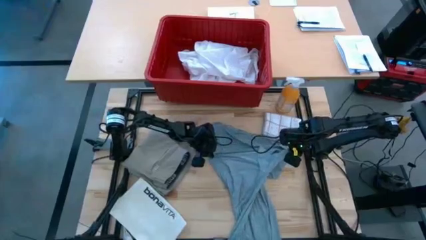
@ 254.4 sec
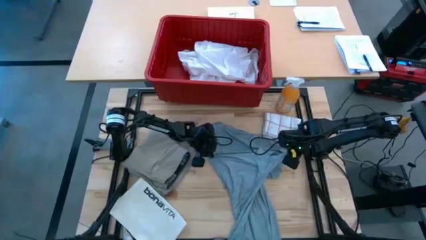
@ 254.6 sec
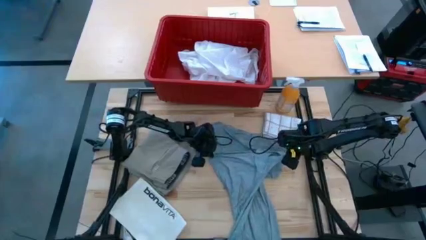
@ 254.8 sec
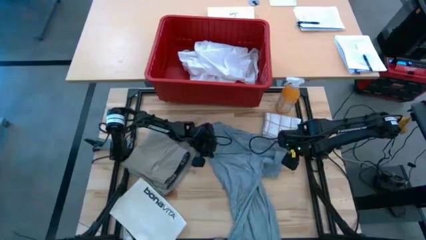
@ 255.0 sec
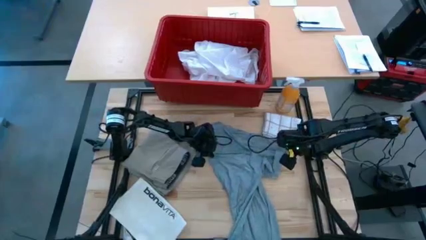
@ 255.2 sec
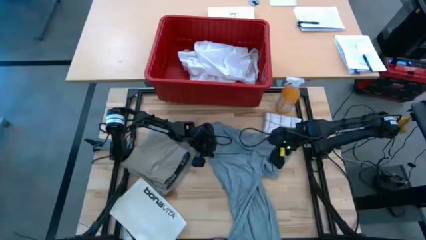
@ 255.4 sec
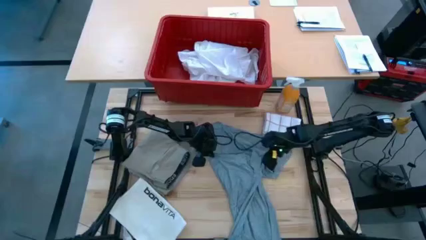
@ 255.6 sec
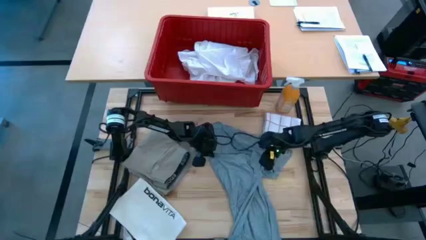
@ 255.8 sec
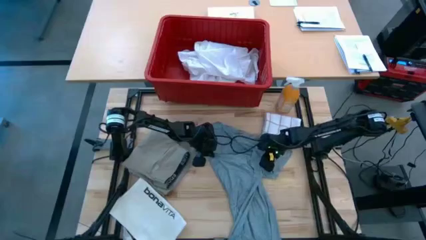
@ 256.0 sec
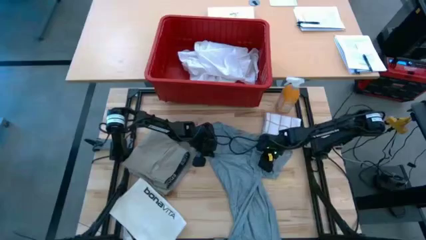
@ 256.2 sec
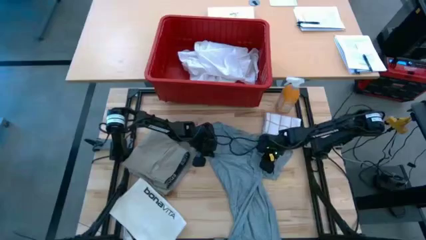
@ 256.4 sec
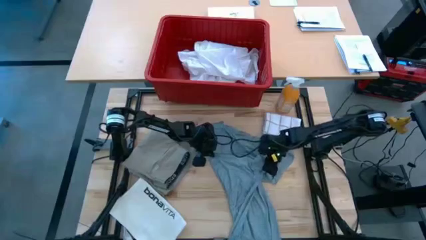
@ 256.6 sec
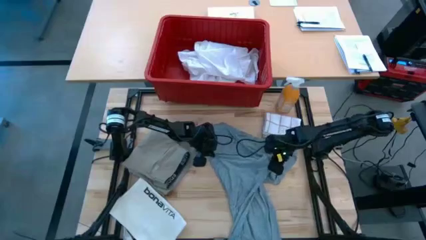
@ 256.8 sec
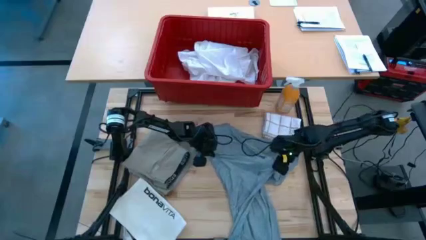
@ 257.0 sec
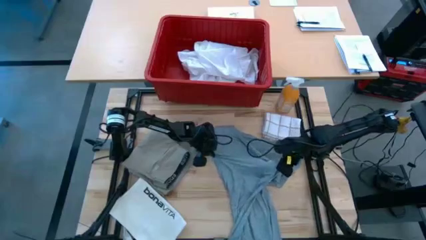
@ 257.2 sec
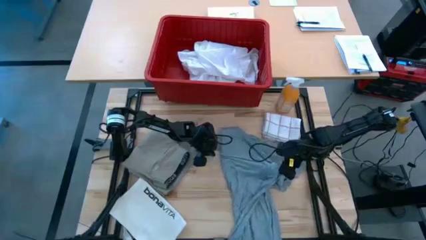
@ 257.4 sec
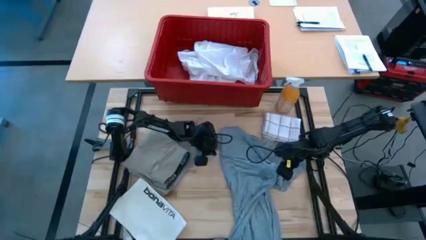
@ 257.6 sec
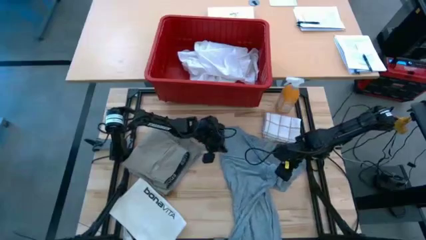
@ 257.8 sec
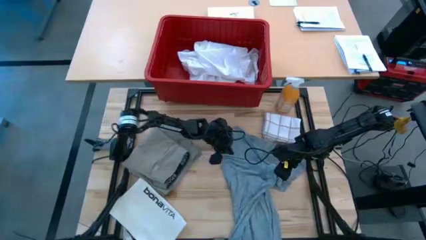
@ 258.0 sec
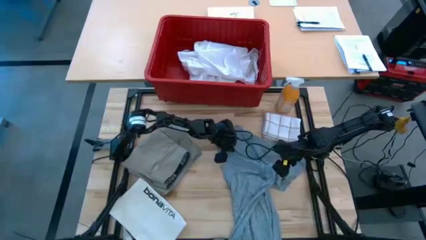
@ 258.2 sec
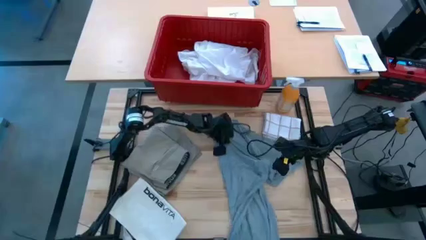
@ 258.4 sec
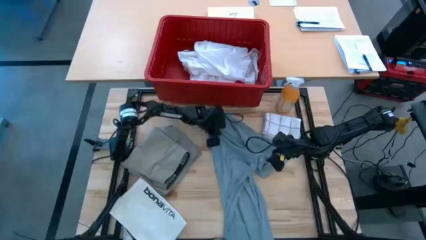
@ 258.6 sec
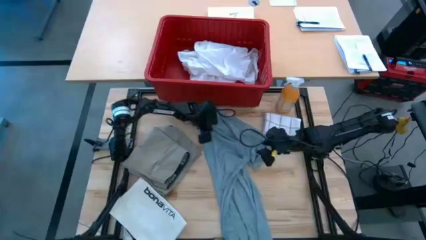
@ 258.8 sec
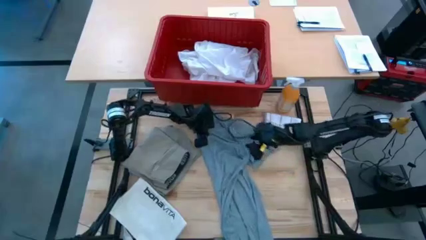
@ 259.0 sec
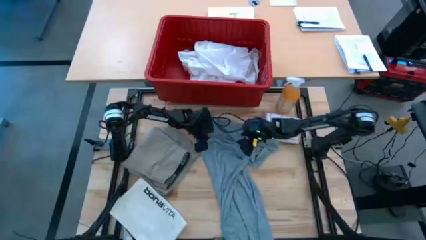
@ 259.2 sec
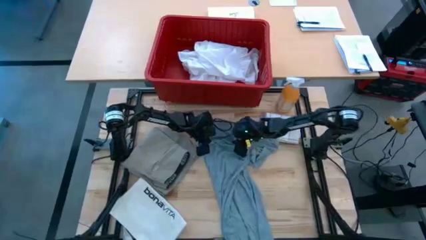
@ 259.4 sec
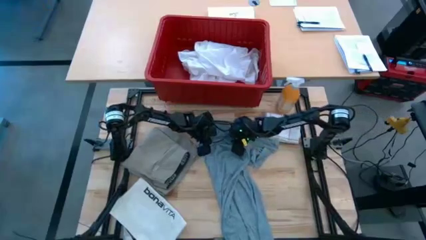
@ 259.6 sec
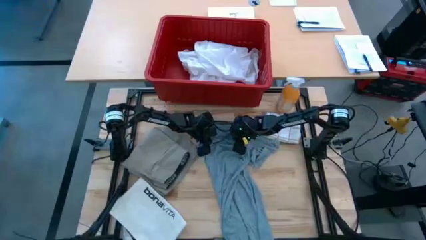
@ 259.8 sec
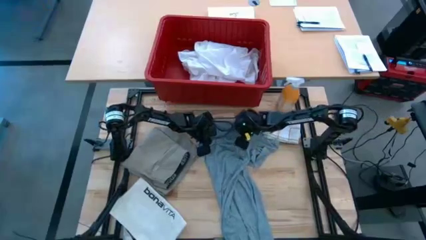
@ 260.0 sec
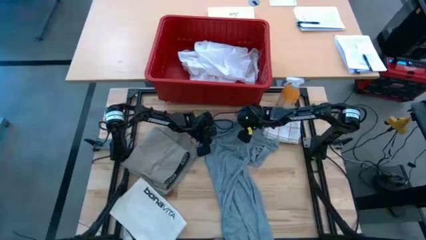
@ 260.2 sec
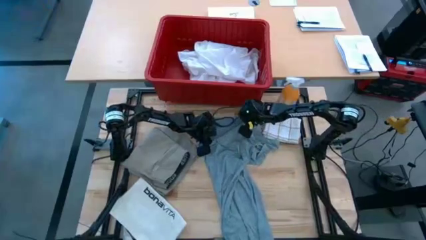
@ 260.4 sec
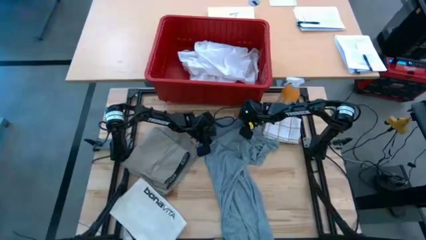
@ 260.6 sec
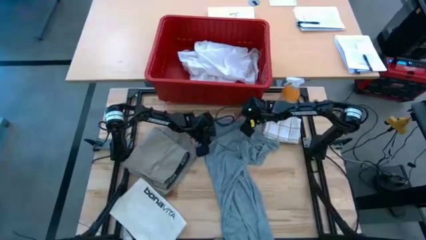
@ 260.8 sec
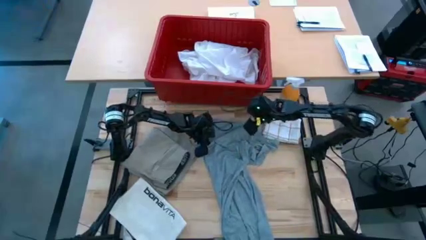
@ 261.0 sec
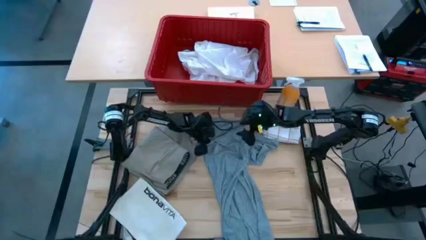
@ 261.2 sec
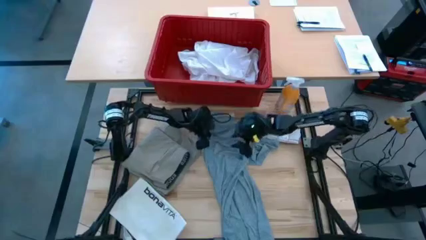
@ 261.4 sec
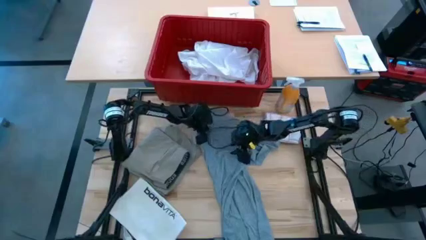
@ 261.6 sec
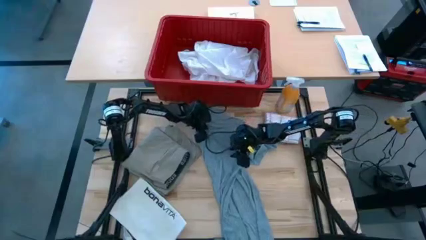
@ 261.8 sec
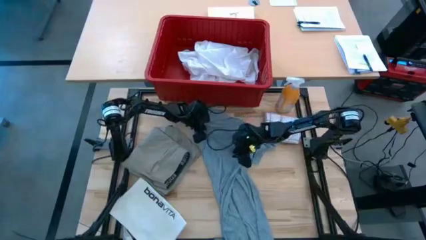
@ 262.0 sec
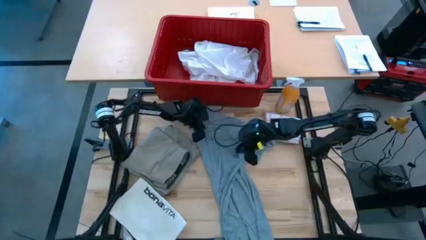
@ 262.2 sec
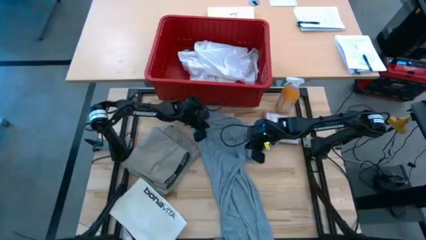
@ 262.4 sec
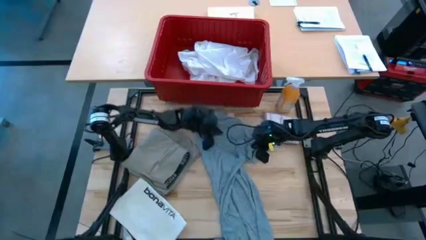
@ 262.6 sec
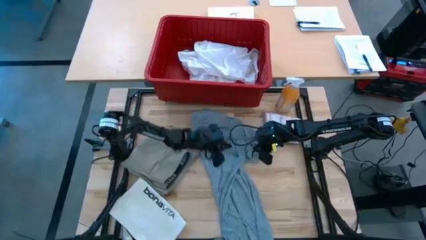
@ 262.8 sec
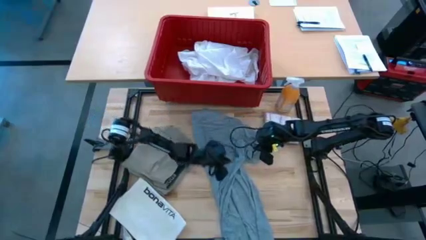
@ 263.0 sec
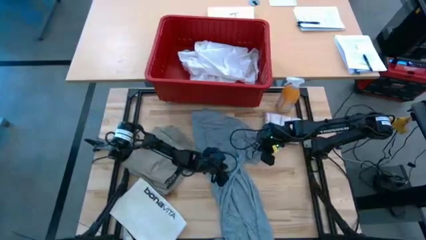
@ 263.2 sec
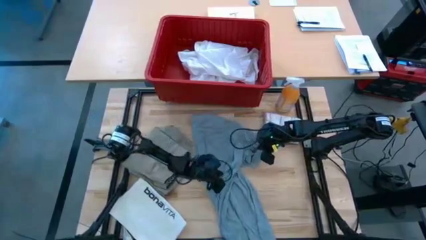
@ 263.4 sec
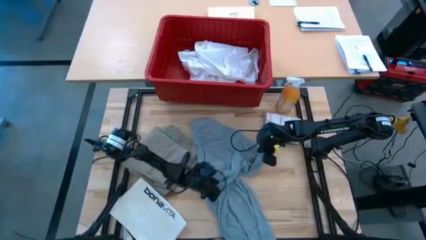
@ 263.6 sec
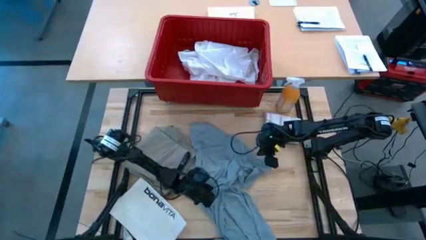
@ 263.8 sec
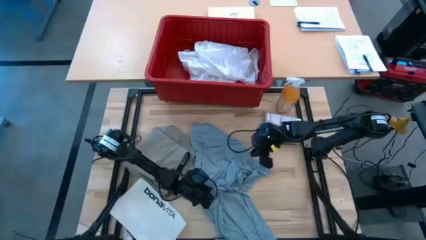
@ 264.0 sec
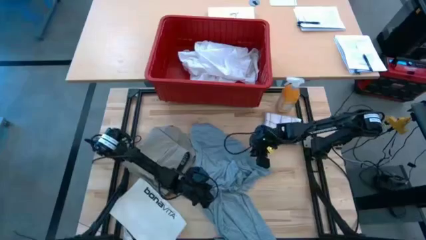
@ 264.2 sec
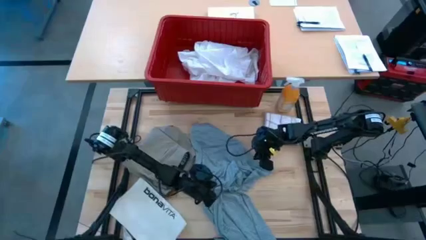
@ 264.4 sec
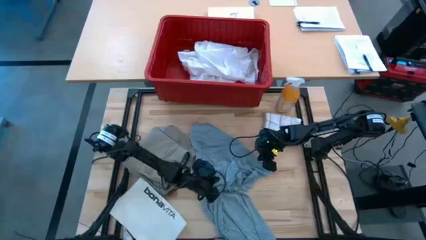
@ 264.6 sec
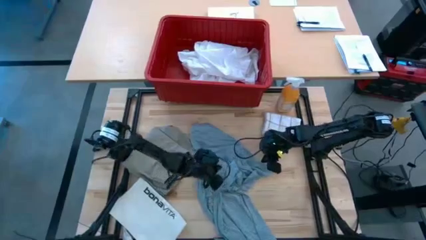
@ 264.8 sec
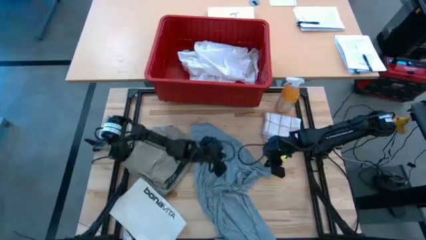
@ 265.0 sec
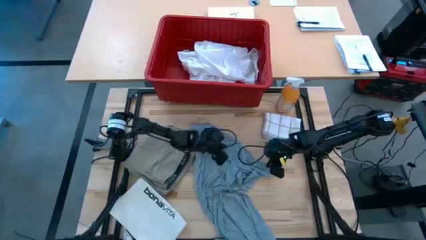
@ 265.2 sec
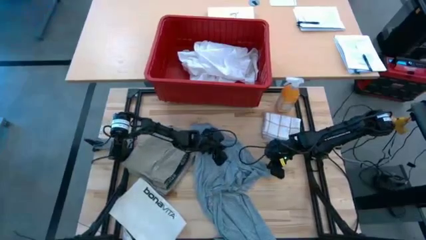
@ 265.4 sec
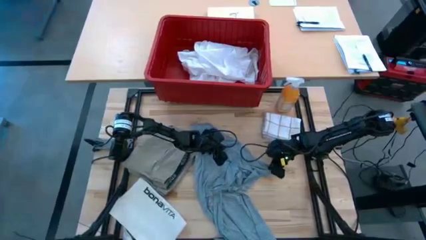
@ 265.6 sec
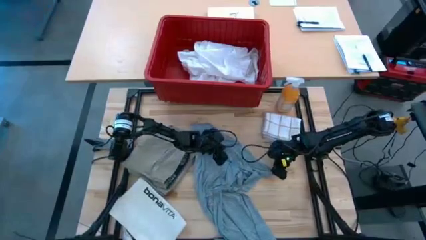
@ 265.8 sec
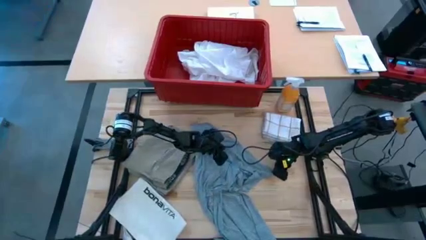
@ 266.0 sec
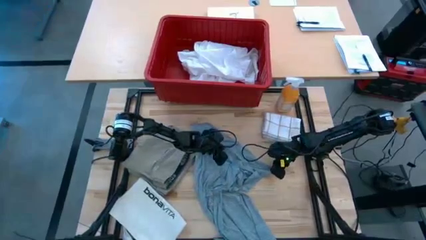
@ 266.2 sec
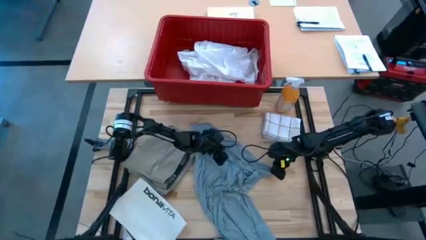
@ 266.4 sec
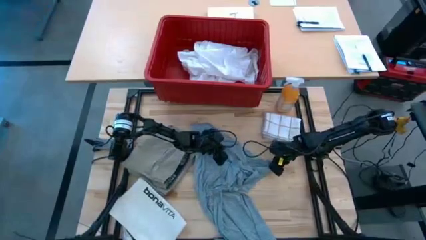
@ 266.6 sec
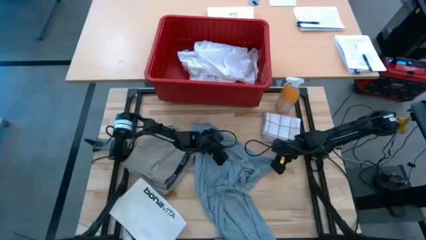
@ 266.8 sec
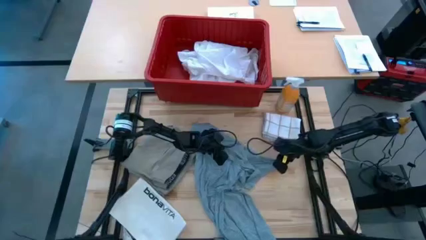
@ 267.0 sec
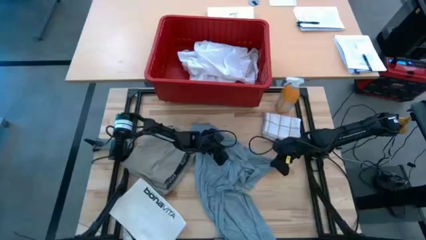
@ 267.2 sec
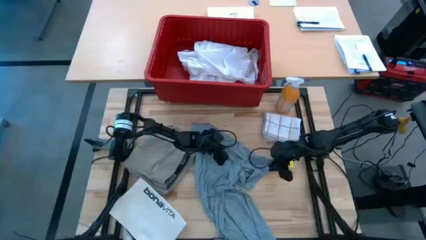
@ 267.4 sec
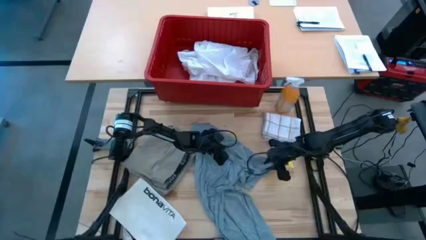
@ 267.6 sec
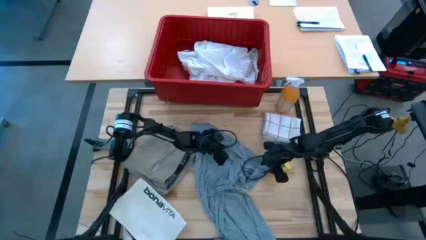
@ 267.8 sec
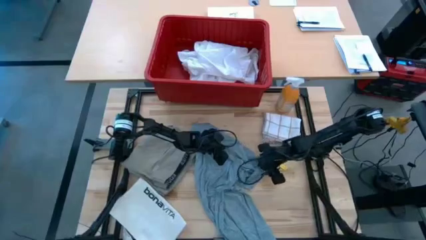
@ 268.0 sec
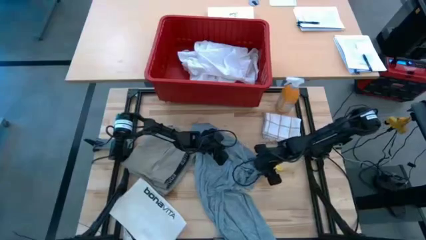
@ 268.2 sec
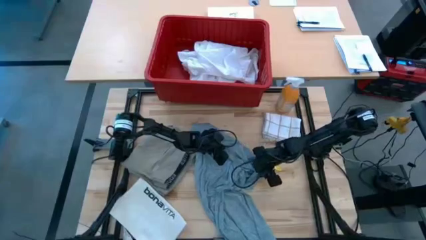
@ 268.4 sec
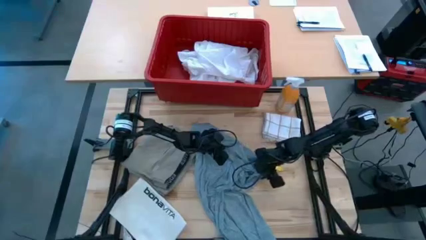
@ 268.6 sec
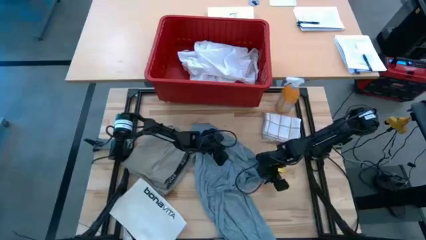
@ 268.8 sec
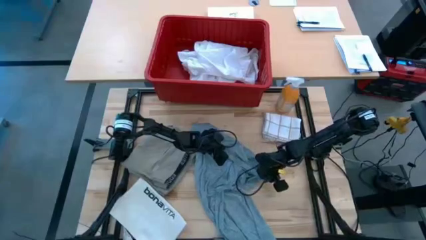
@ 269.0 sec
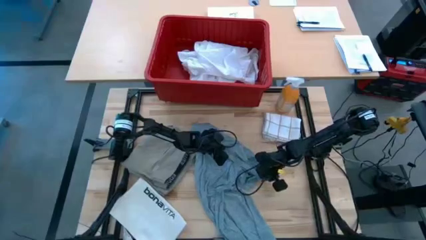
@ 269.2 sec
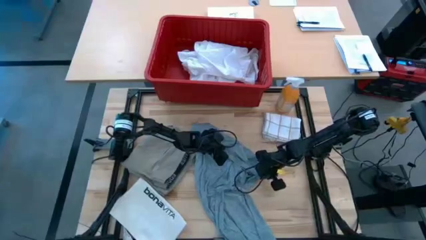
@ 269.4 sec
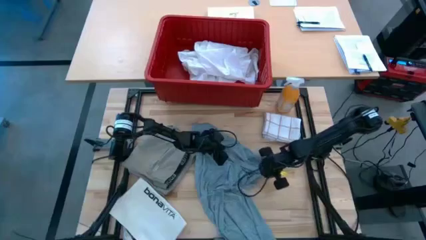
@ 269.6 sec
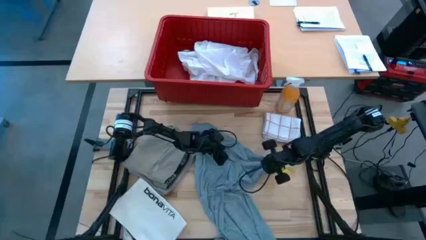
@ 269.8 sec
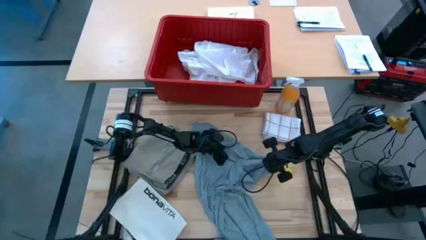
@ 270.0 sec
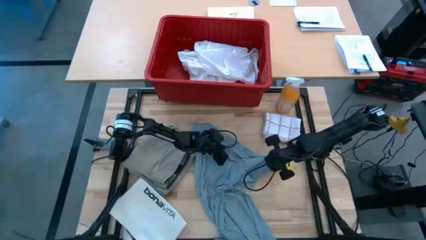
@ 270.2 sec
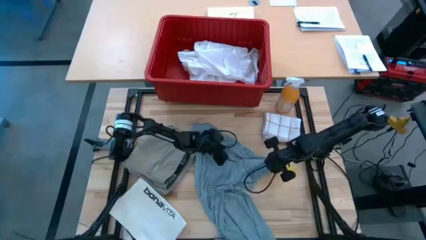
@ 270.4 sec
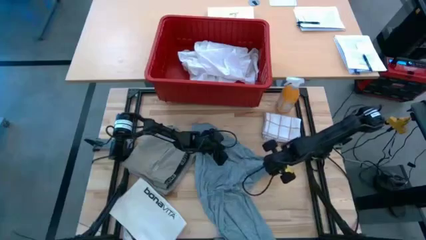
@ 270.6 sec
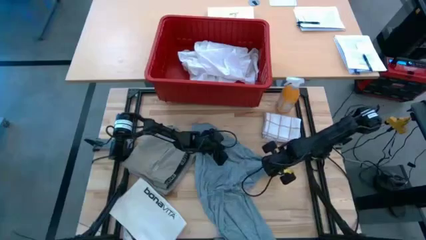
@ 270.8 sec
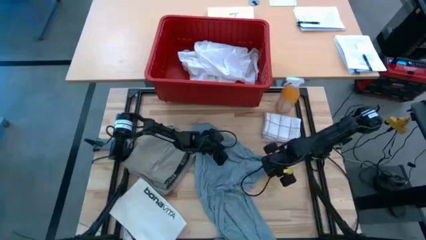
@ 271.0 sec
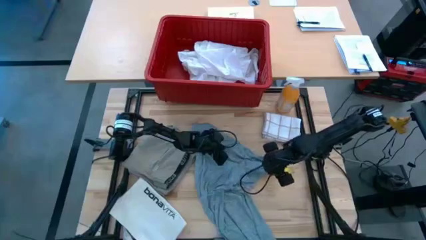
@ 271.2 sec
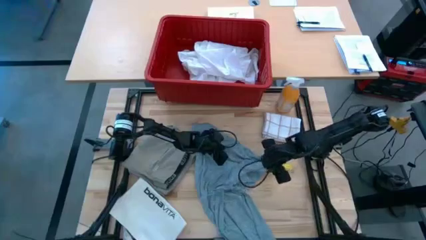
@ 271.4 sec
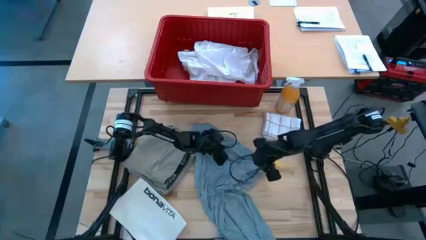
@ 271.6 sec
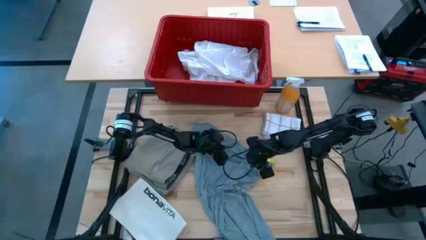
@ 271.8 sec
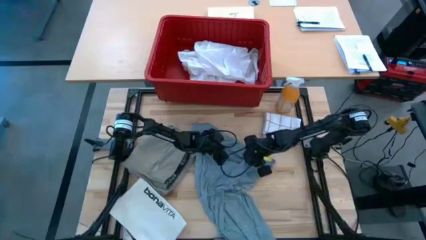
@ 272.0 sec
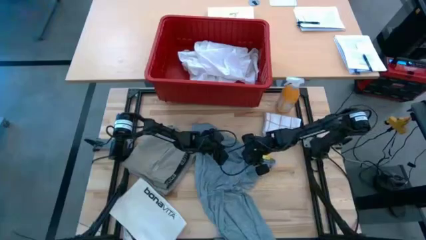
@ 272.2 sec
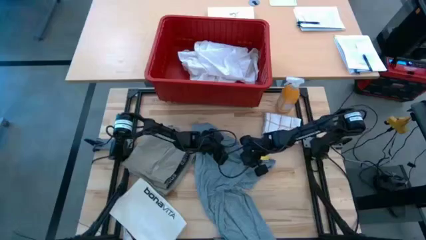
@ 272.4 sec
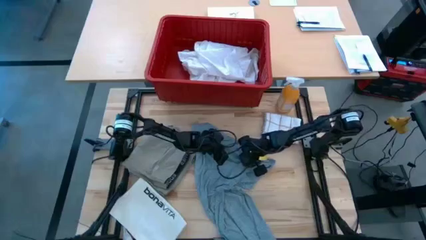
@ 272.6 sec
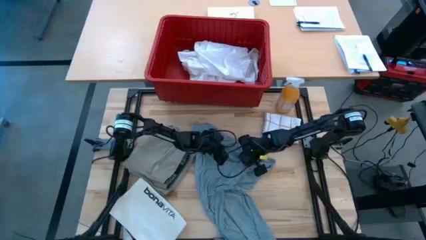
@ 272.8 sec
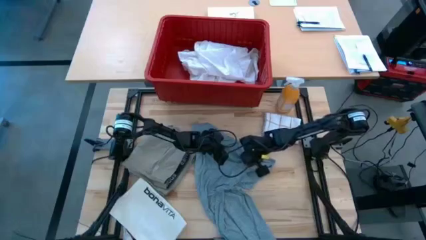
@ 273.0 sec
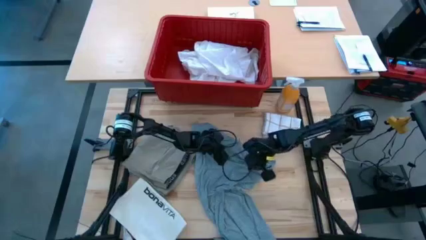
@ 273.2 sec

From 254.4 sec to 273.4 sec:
Task: Fold laundry
Fold the gray shirt
